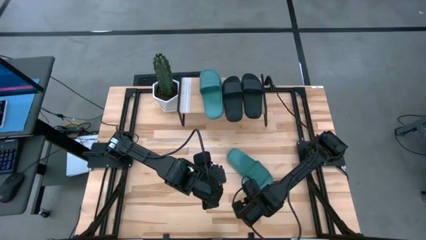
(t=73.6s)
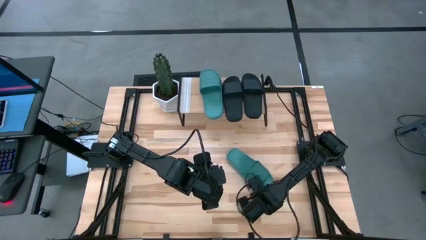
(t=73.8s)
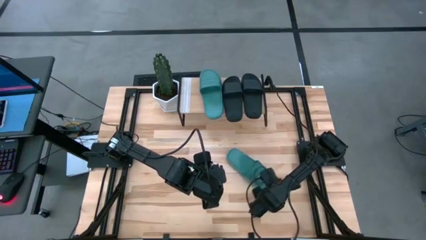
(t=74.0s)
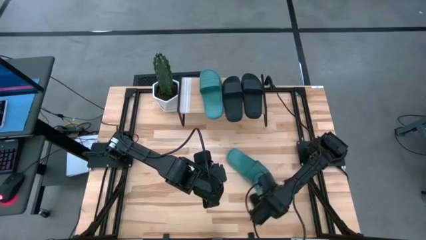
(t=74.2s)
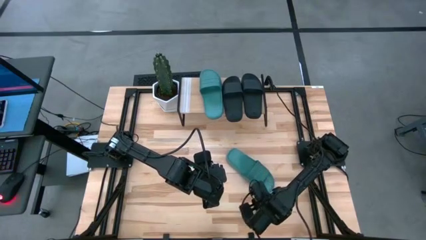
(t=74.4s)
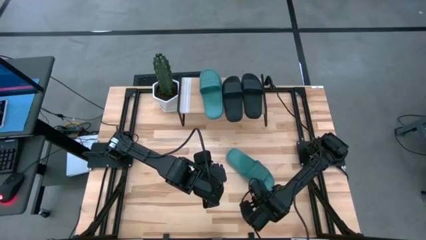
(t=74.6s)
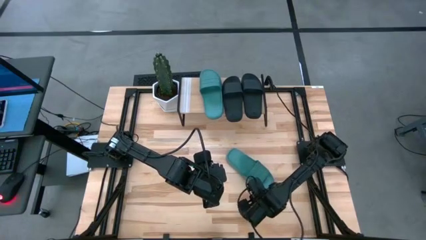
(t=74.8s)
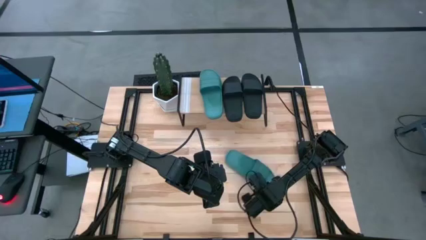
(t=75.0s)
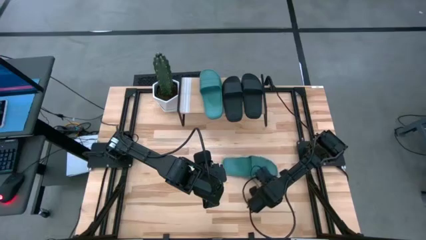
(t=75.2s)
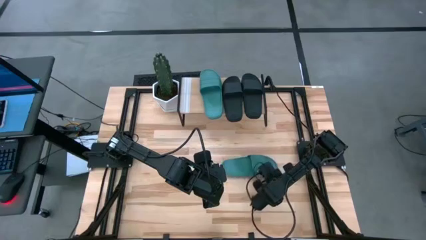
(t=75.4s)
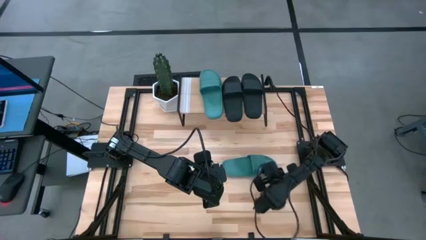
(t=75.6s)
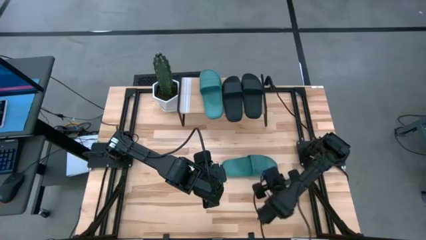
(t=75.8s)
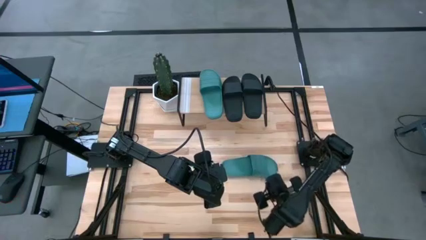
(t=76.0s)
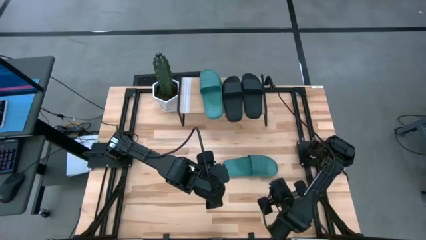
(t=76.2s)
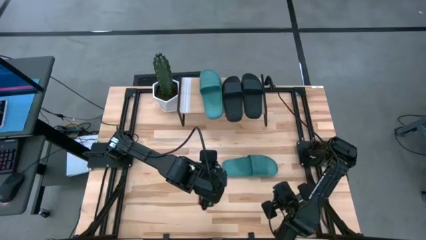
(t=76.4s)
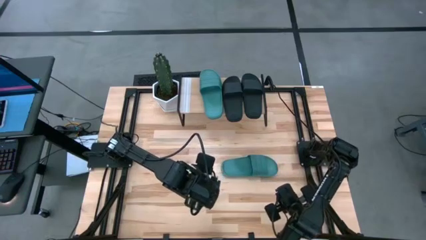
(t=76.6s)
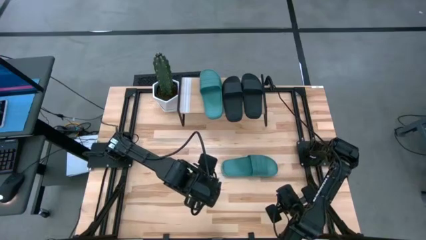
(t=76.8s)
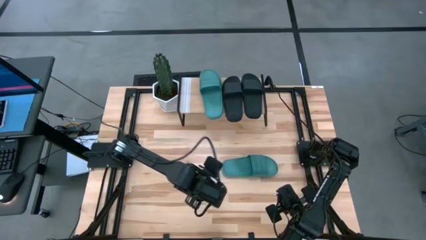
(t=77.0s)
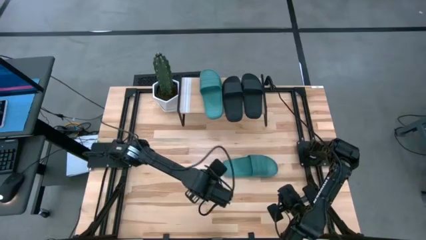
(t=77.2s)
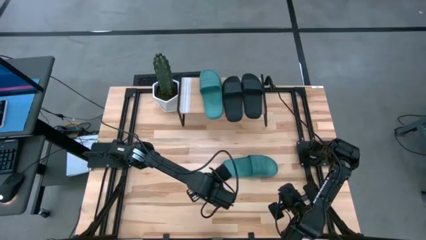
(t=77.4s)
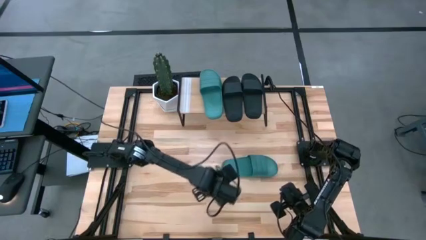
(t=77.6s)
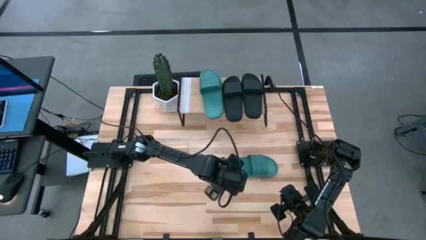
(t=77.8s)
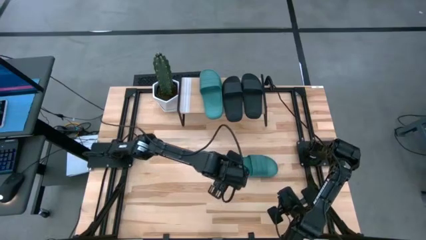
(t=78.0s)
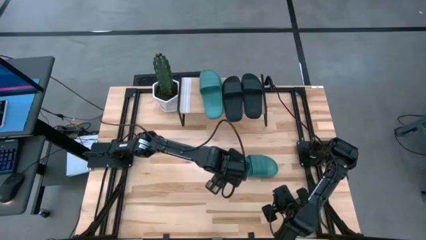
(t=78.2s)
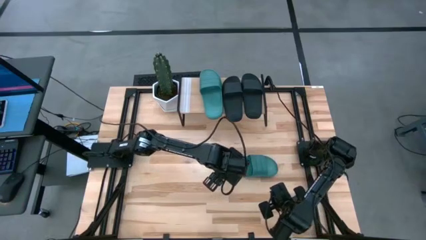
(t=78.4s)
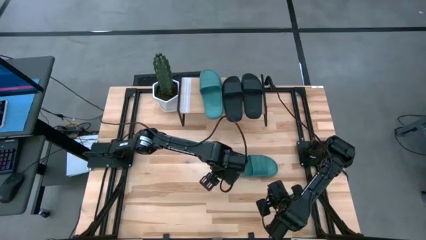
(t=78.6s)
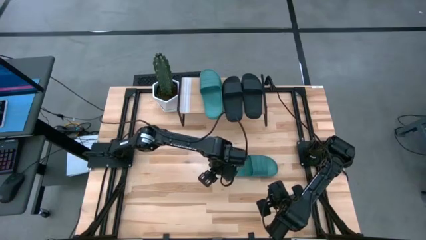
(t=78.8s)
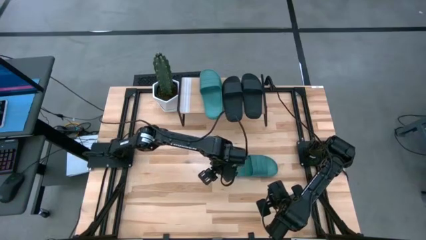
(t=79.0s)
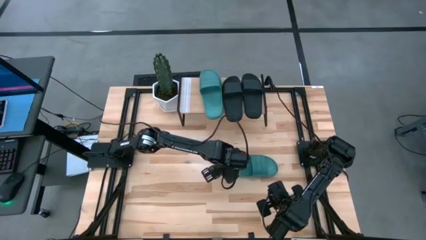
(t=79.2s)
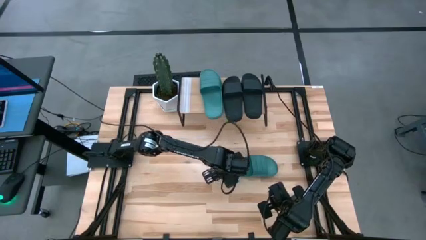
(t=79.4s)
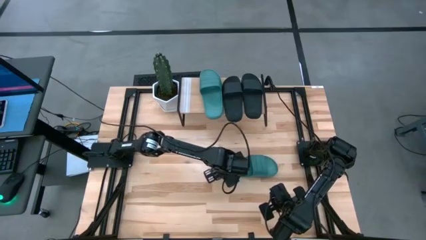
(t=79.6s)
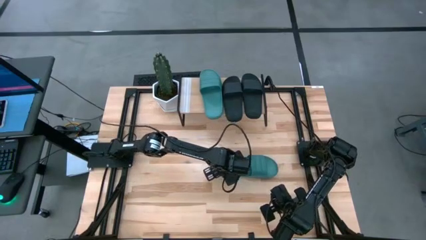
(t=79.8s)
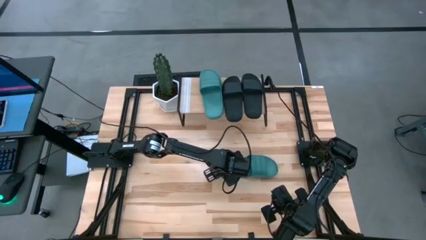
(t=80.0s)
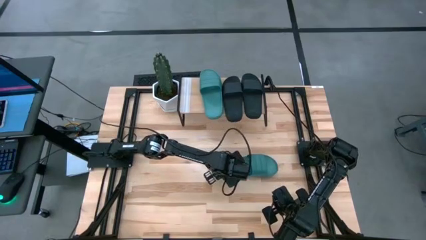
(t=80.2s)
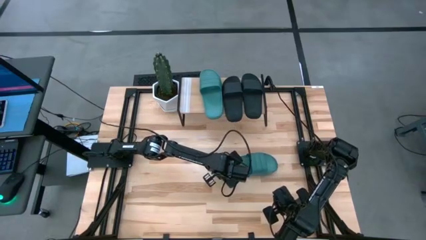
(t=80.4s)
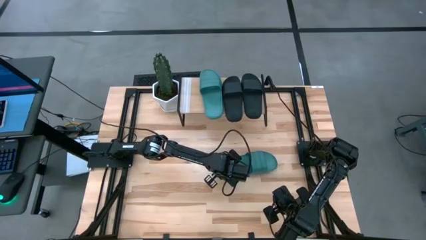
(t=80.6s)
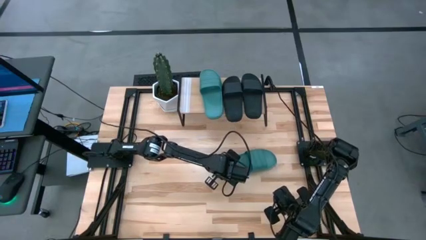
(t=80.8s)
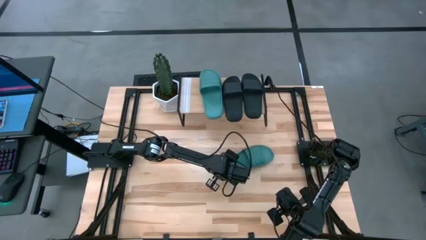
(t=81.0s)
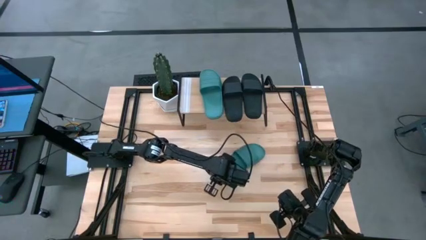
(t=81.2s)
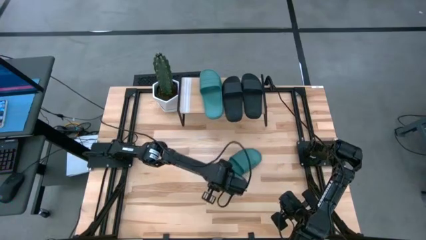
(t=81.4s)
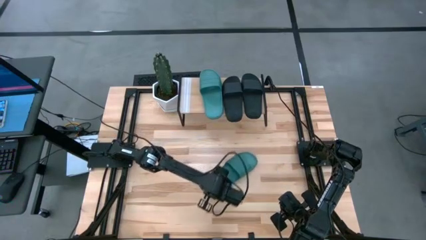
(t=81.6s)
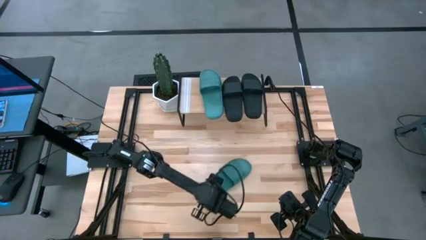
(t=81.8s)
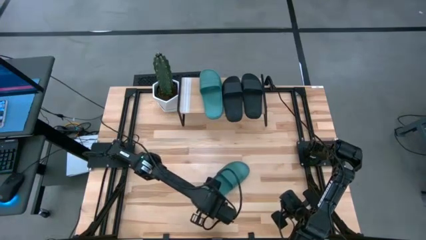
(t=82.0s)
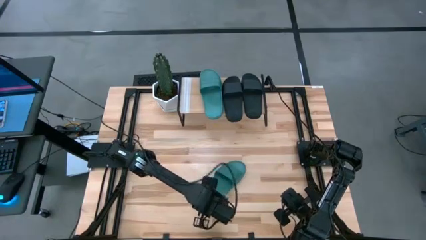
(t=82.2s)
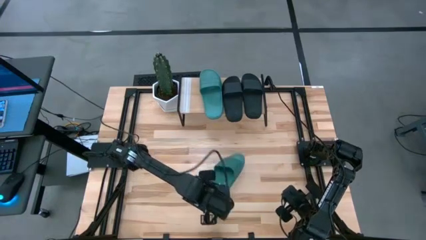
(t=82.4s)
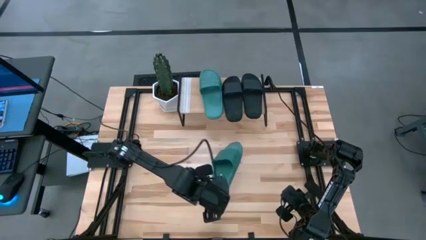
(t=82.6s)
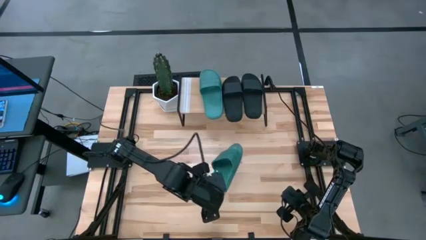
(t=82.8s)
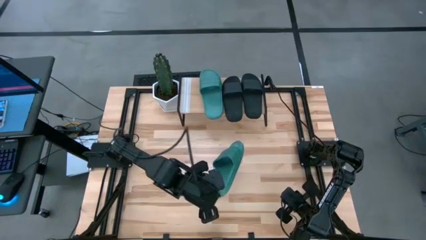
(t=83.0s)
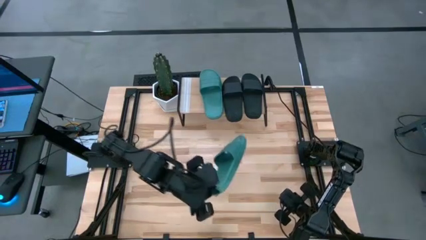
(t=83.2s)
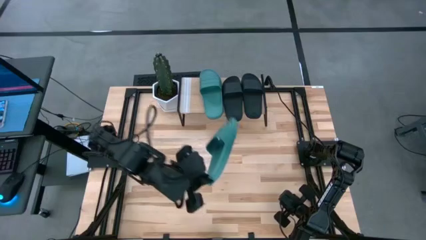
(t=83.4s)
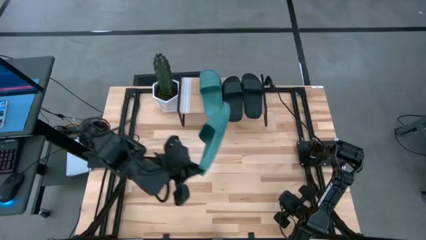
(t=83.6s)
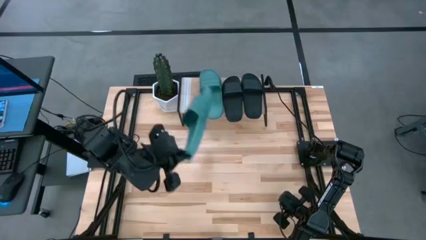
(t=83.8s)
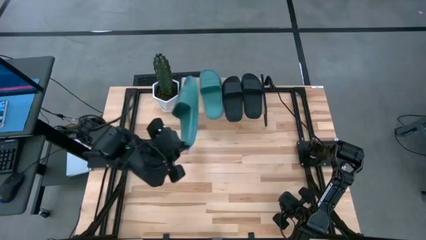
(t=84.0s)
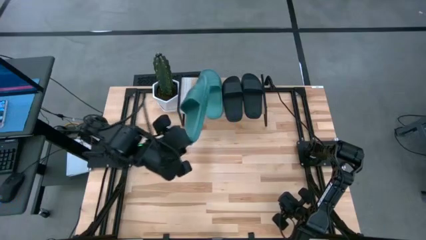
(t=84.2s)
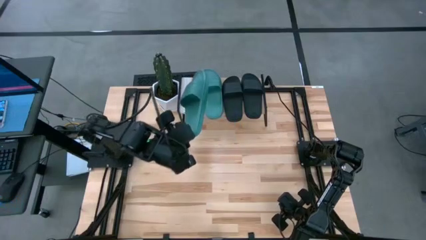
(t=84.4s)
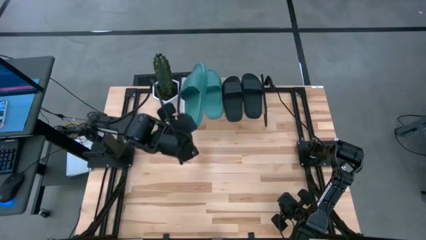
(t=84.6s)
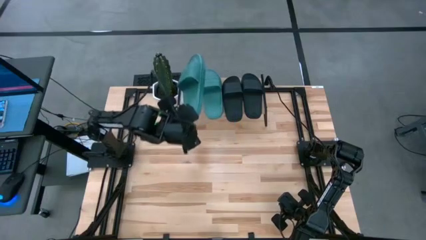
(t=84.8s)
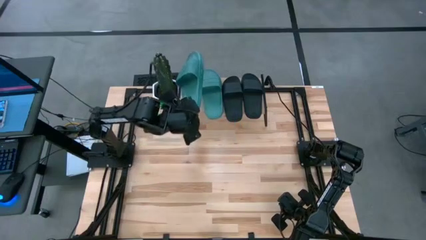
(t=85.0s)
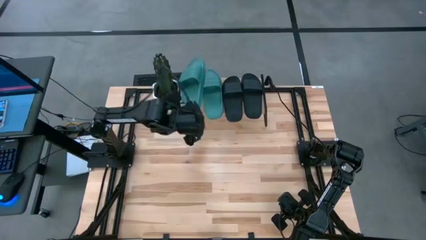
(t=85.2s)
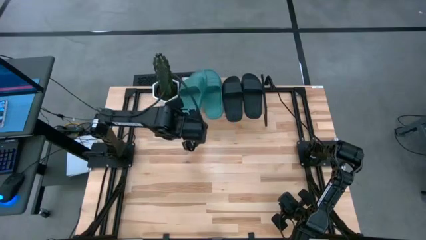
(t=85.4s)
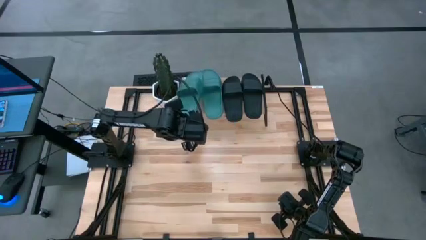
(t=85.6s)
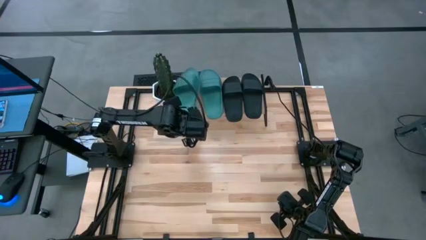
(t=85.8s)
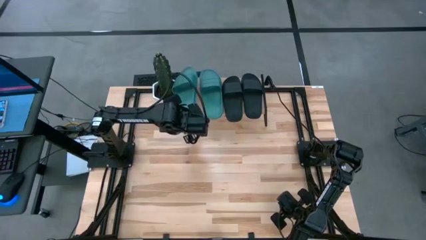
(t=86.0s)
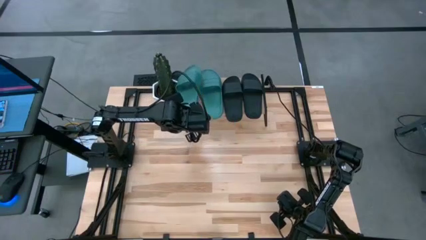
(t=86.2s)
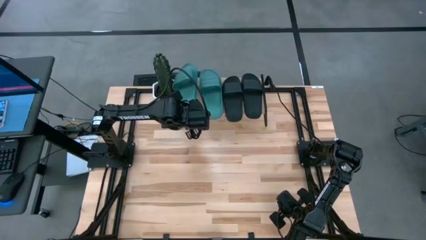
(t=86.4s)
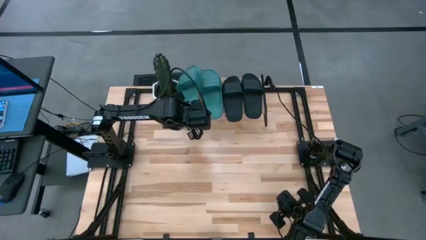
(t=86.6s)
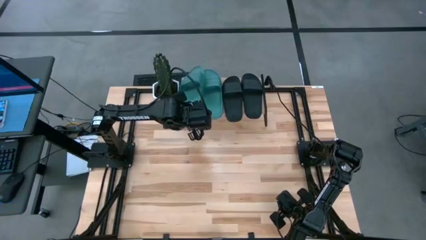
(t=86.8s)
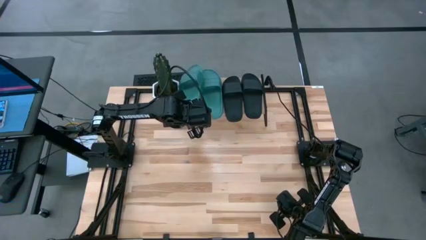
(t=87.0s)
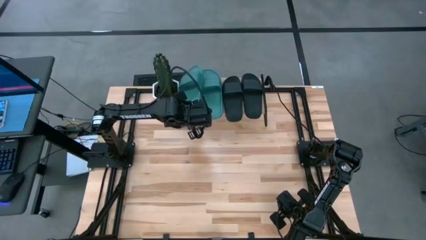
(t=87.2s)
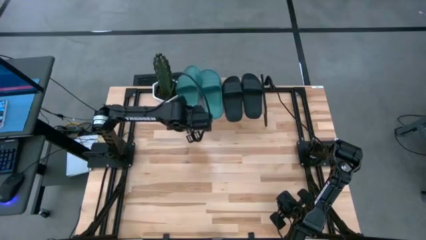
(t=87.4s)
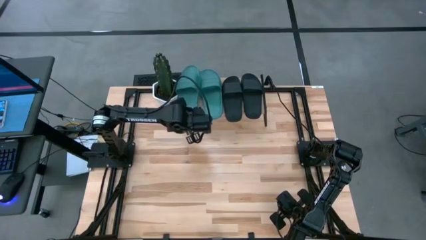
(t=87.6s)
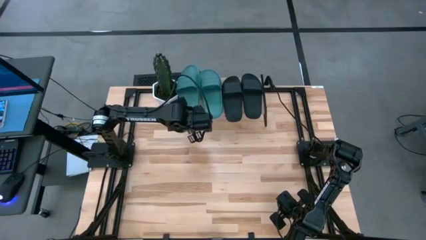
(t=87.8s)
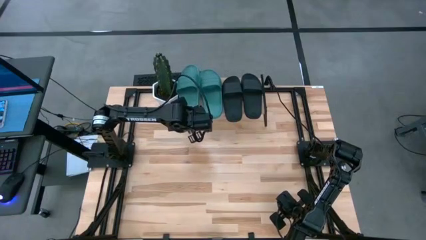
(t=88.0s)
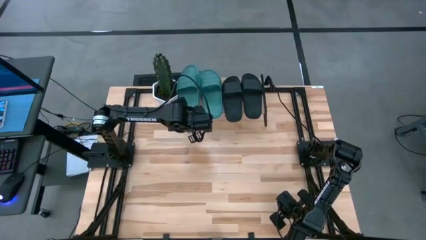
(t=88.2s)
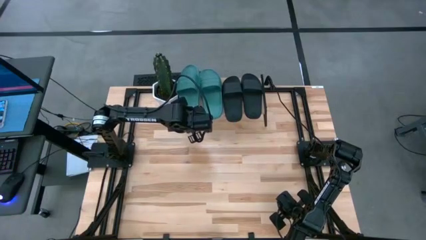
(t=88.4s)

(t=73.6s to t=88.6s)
Task: Pick and place slides into the shelf
Put the green slipper on the shelf beside the green slipper
